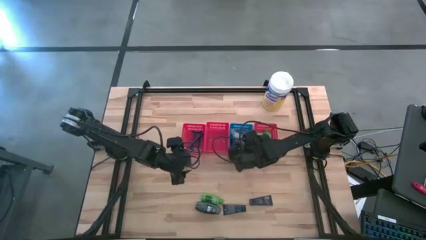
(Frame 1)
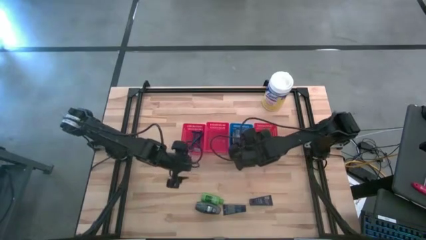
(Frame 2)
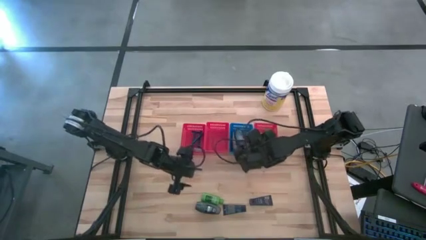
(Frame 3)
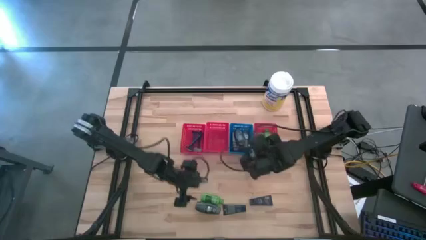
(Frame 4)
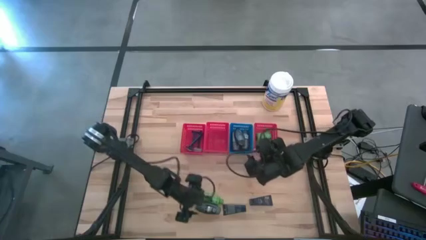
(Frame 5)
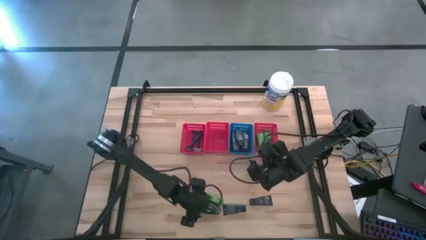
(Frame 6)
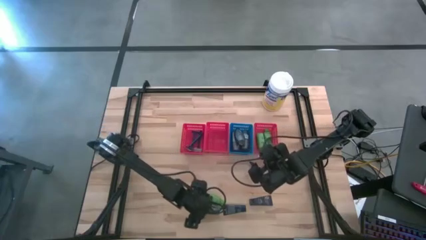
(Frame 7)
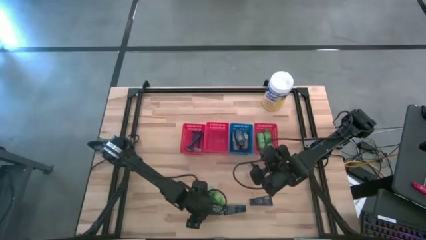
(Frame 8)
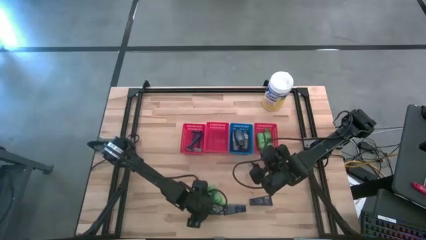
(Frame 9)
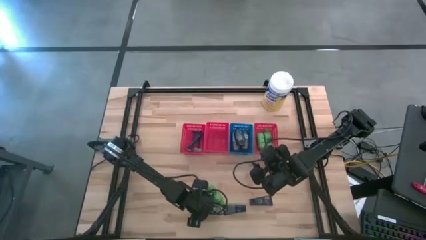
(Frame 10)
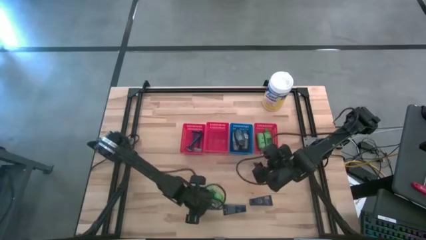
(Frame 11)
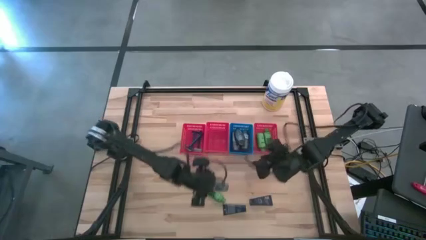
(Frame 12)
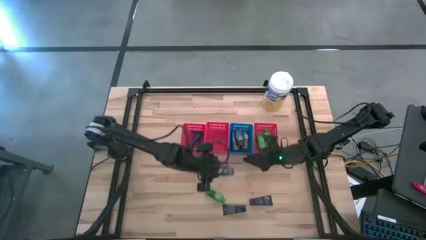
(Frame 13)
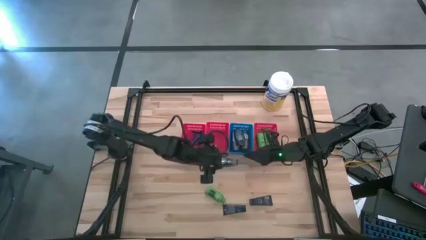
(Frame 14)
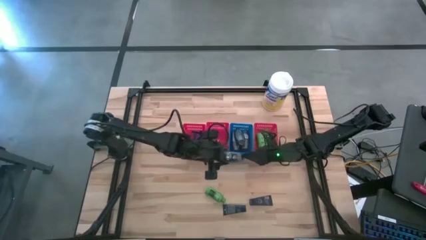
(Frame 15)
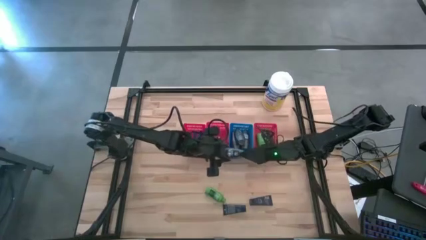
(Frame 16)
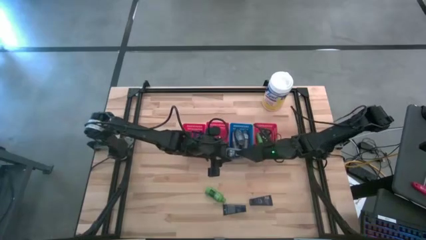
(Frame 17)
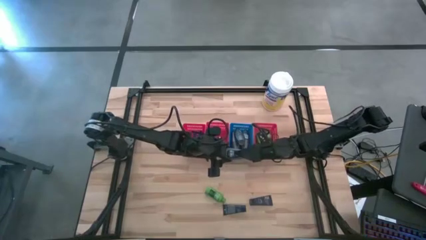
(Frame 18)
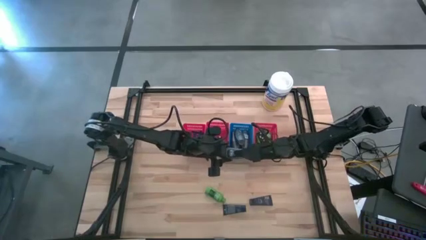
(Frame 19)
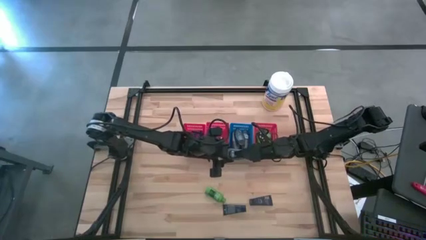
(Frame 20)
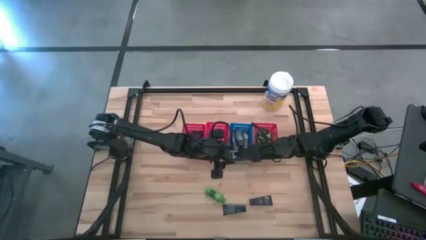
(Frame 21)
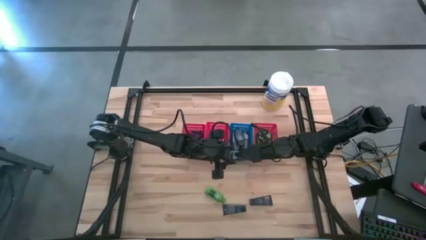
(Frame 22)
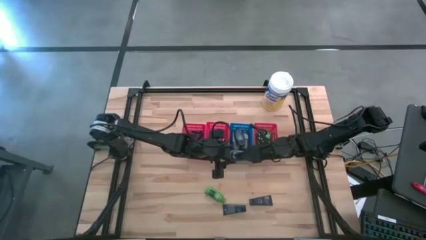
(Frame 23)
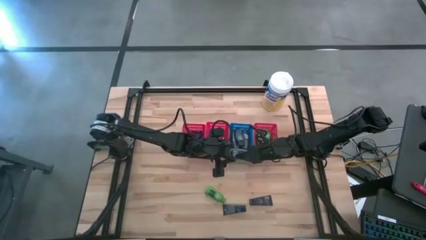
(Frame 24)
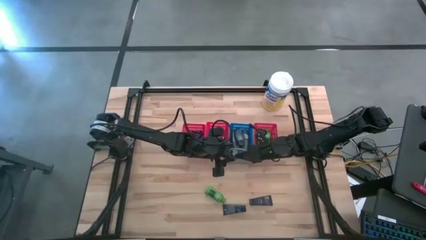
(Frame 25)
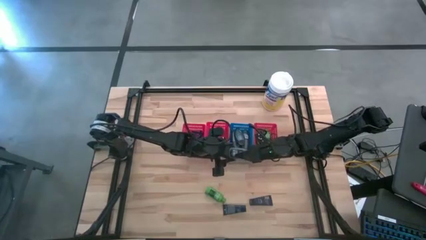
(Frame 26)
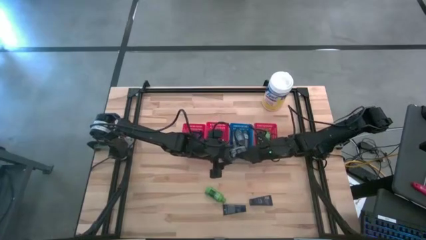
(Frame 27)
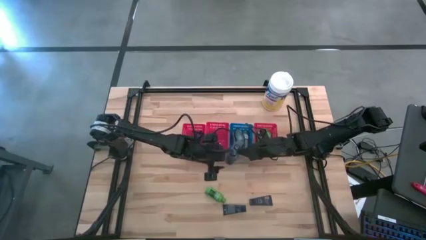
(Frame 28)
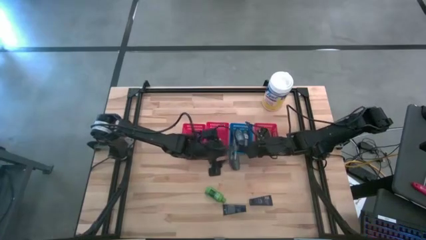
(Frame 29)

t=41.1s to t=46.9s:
Task: Pick & Place Travel size toiletries
Put the gray deodorant into the blue bin

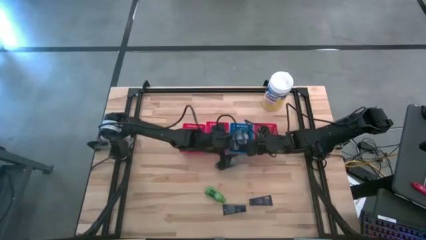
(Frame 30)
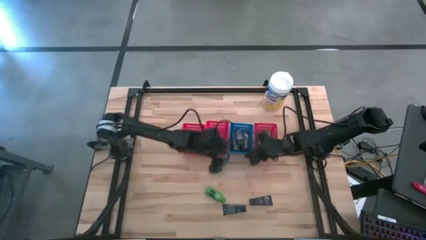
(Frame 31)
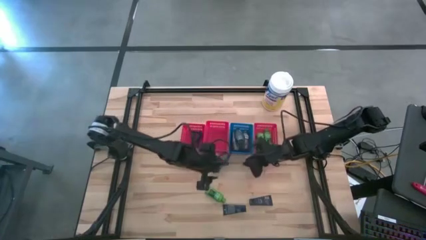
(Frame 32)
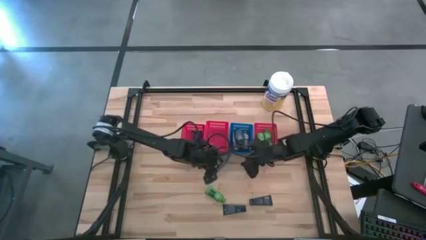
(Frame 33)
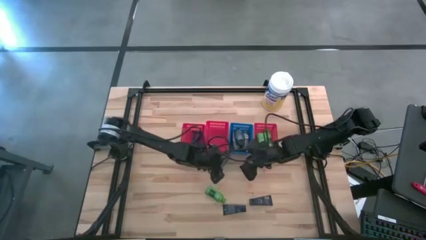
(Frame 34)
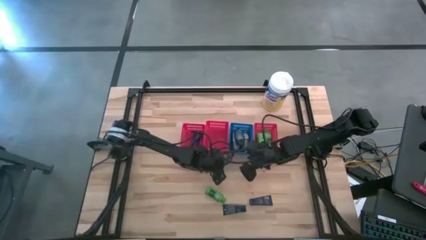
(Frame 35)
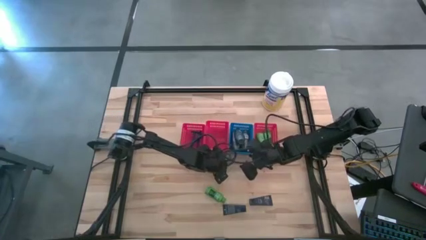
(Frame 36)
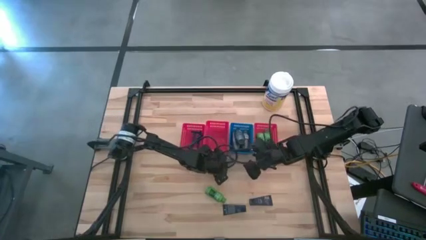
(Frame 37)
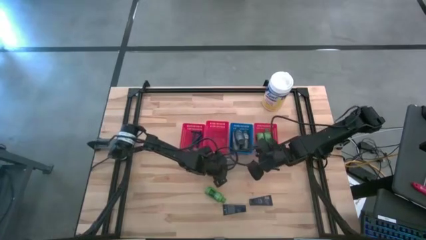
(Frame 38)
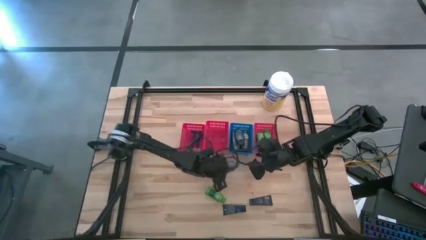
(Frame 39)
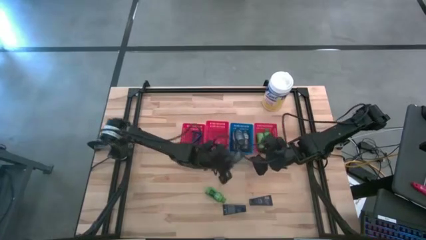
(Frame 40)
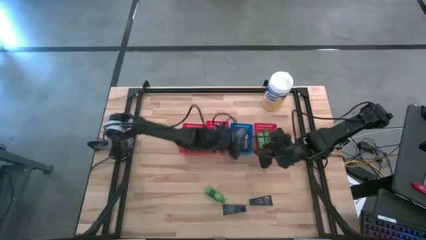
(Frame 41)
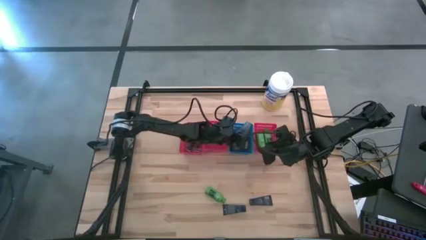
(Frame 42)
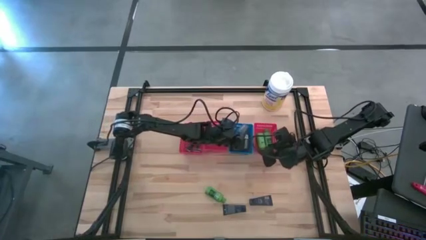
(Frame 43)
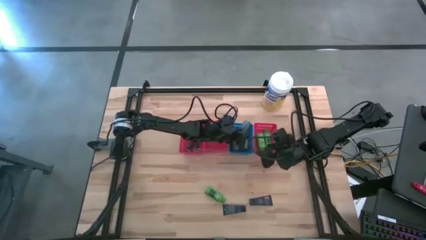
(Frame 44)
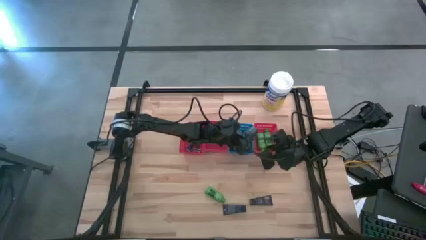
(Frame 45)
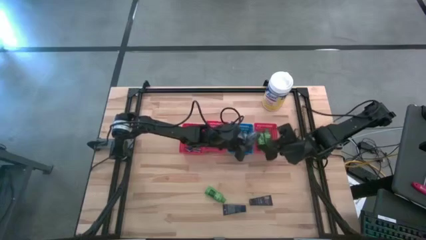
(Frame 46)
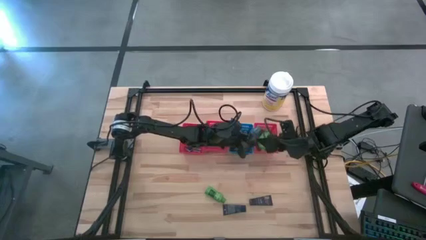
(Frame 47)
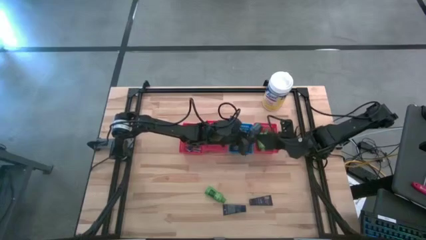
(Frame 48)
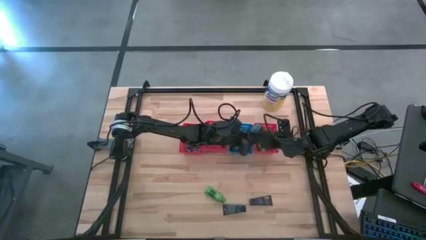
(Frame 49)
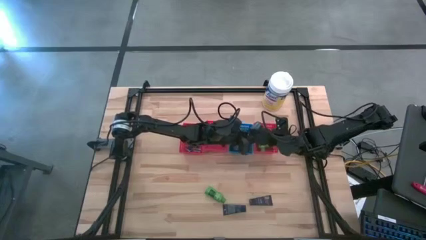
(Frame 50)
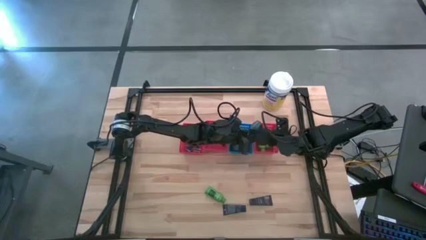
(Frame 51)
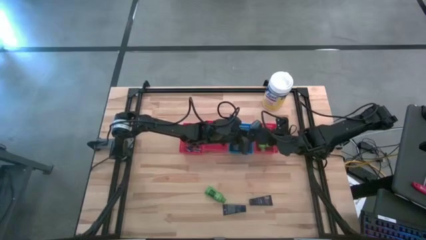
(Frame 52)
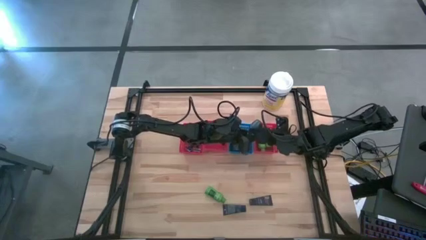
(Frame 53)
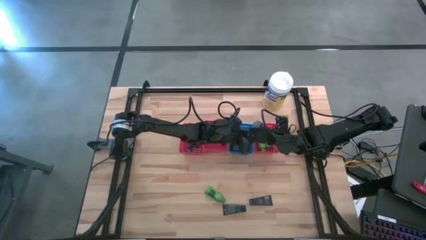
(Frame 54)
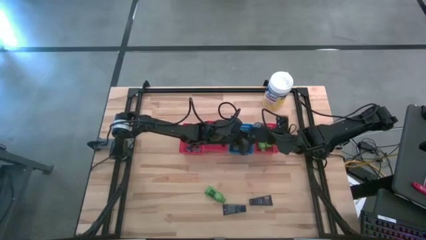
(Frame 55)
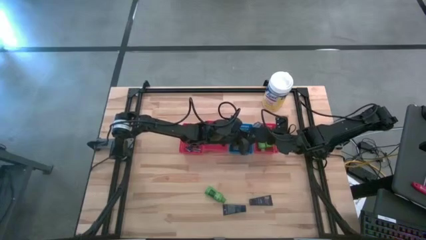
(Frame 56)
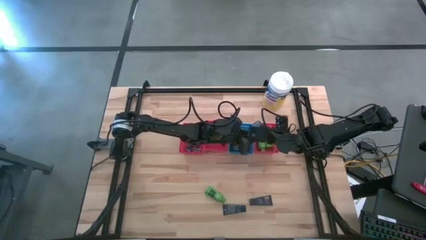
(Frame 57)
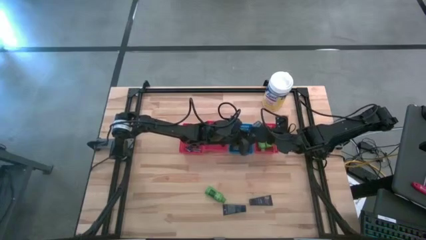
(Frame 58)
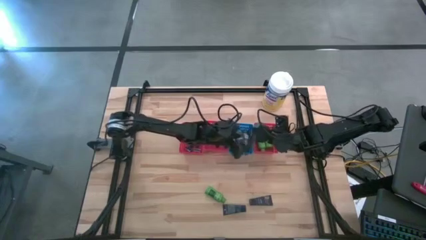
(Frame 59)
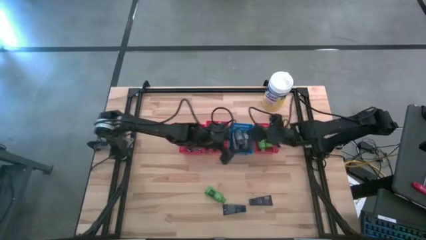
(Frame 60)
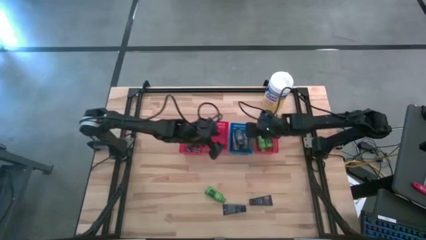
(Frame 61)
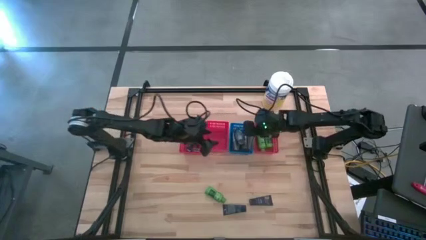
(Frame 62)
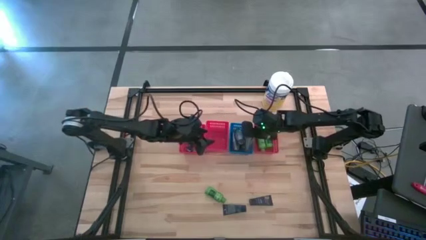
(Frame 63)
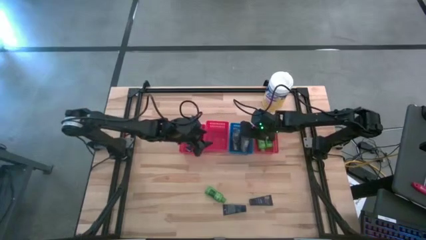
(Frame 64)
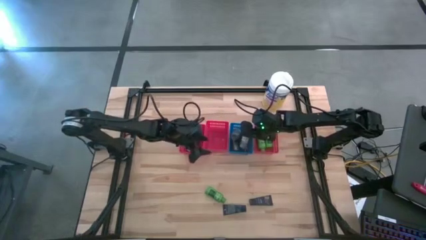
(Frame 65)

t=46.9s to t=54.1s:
Put the gray deodorant into the blue bin

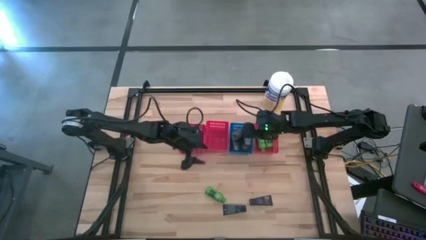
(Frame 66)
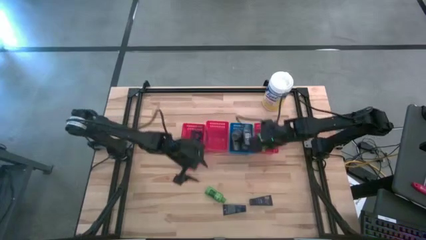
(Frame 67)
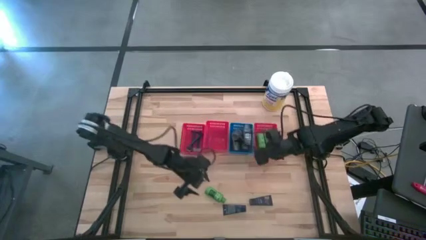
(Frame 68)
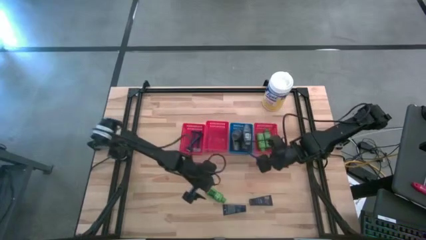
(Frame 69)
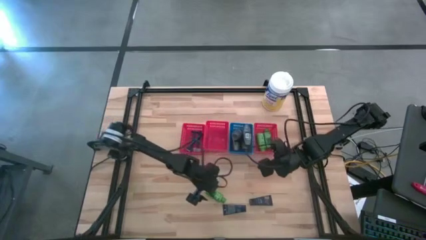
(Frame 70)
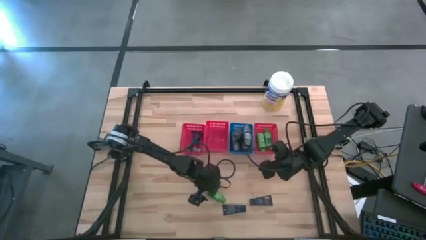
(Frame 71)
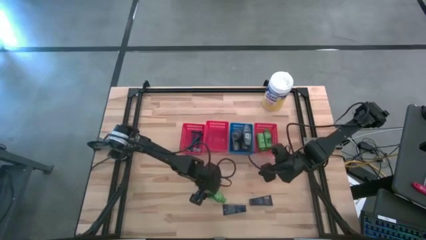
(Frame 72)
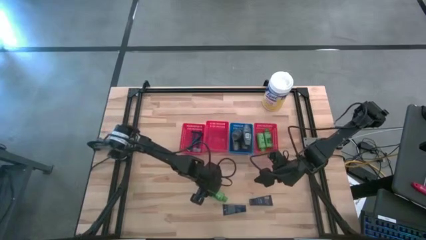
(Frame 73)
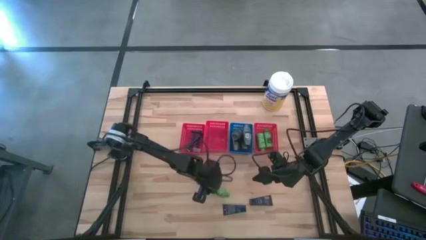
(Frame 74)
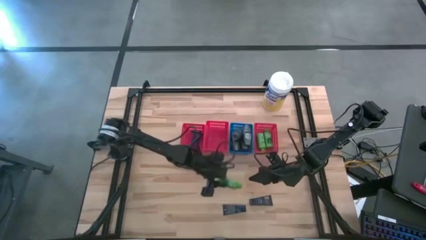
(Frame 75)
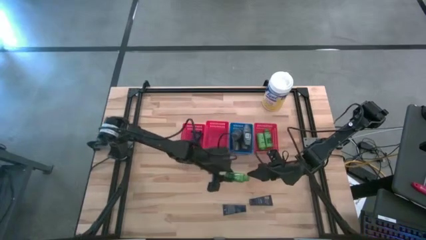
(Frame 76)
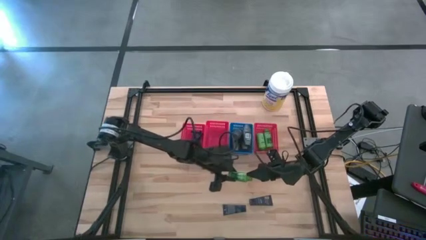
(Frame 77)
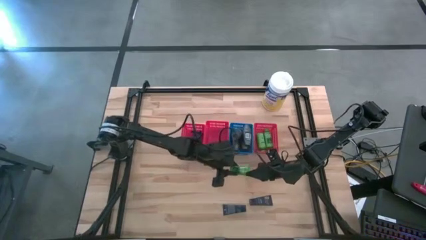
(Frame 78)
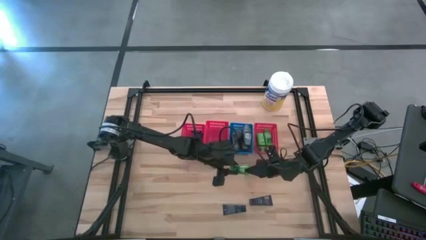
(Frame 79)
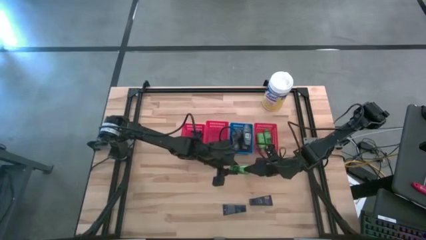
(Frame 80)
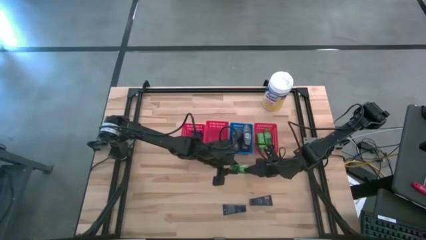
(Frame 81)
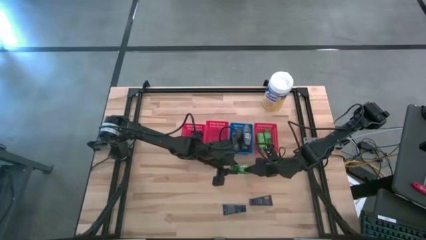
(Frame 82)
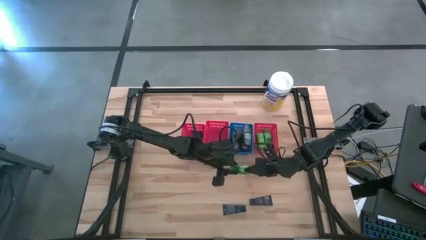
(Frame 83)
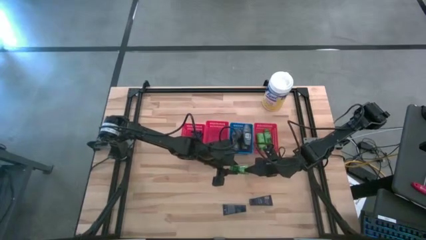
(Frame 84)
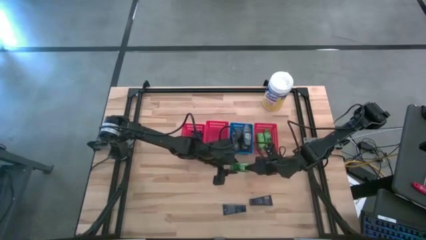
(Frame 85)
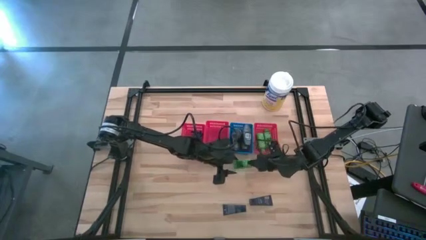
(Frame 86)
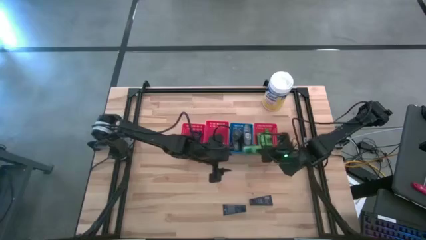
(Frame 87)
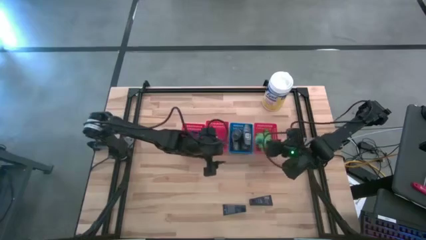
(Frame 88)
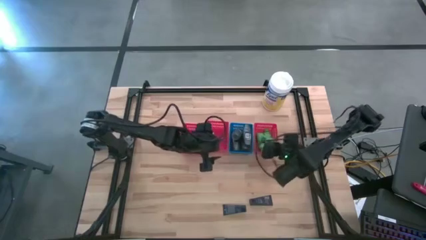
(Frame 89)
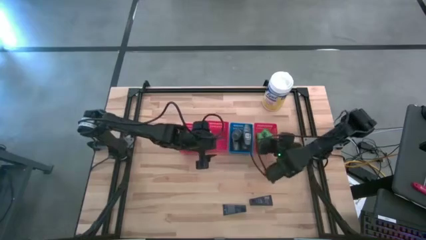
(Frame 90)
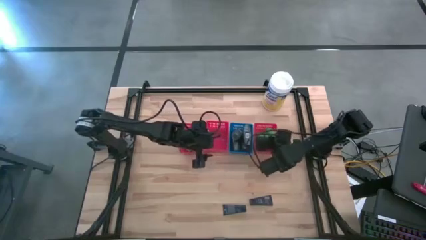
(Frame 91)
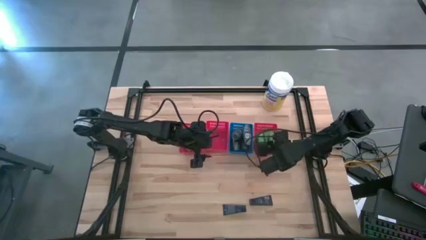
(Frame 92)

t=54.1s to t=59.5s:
Put the green shampoo into the right red bin
